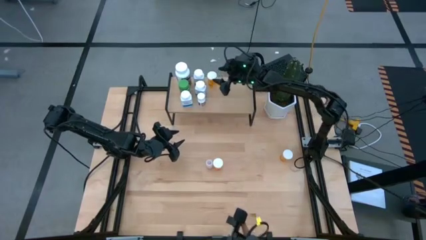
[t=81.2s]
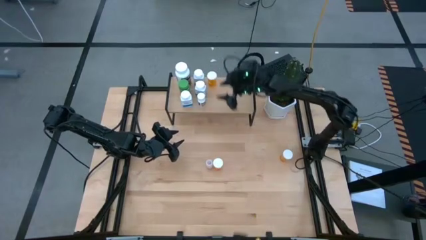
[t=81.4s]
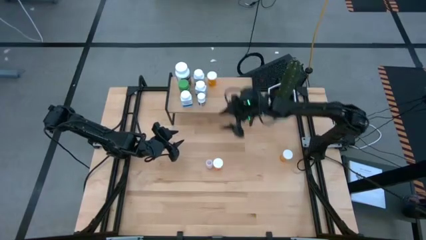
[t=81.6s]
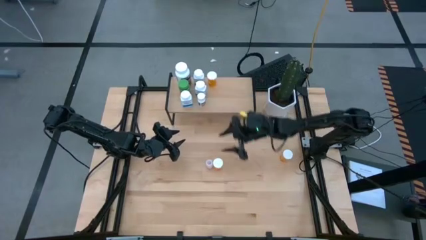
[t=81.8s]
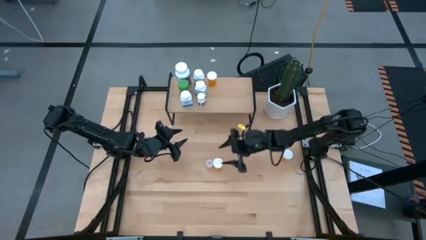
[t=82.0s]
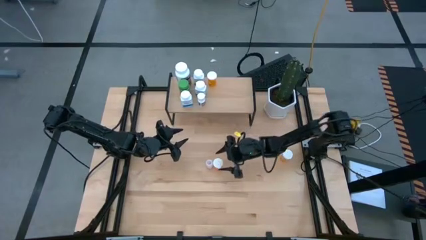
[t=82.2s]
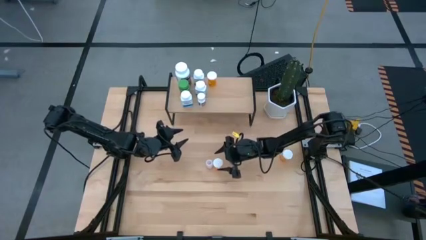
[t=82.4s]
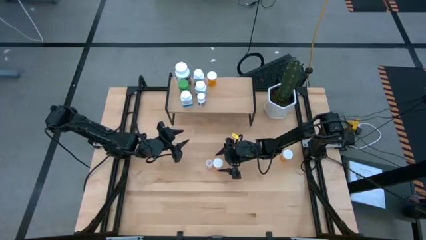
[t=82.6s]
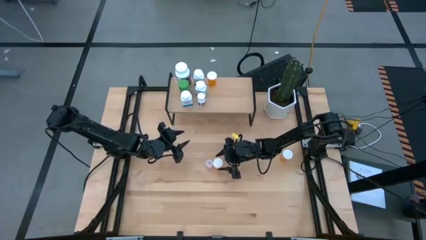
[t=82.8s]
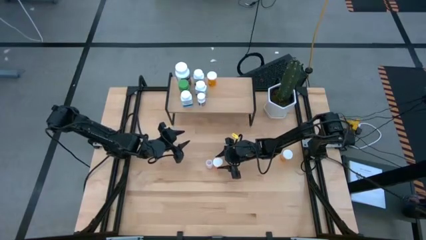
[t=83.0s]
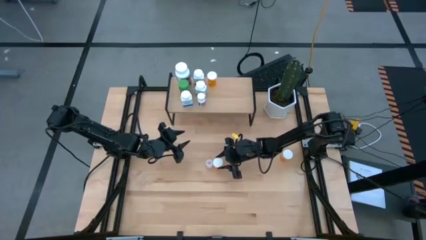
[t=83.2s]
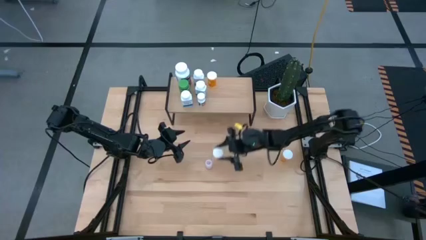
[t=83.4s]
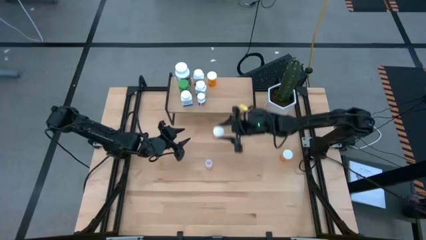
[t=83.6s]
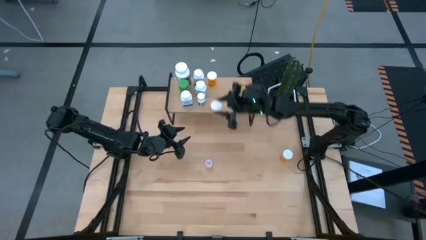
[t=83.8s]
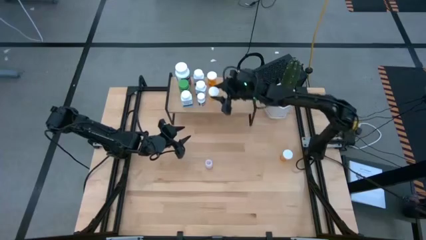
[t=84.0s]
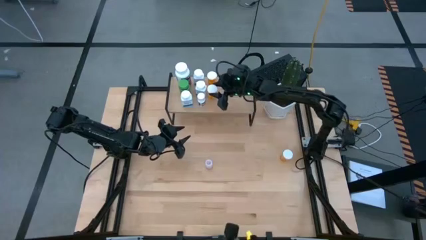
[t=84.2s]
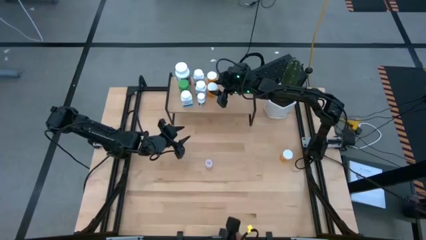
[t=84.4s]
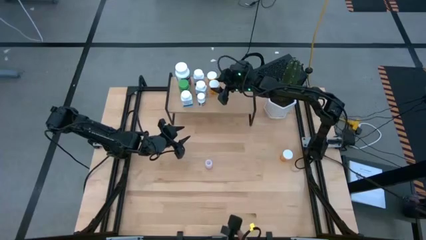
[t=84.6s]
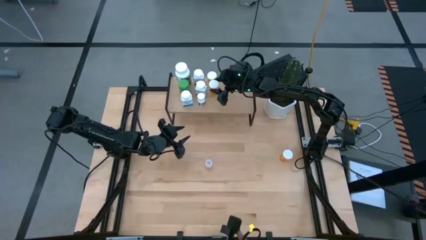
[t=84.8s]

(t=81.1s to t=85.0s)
Task: Pick and place medicine bottles onto shelf by color
Put the yellow pill bottle on the shelf aligned with the other yellow pill bottle

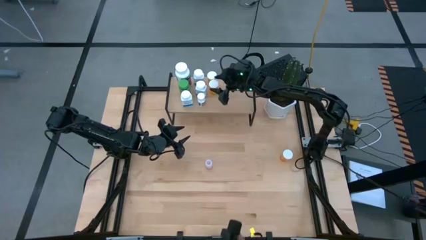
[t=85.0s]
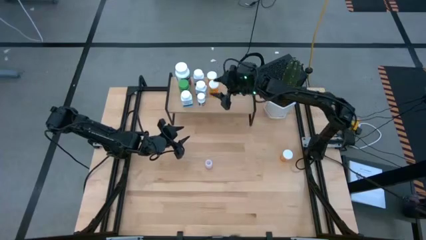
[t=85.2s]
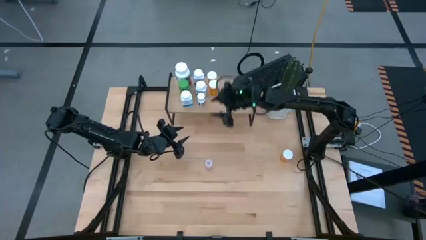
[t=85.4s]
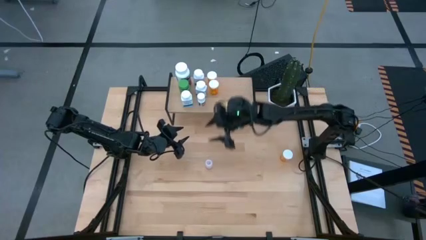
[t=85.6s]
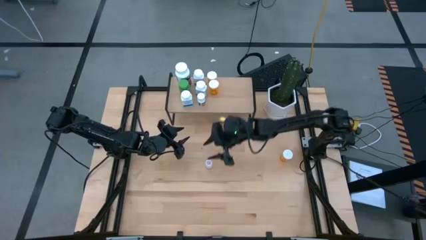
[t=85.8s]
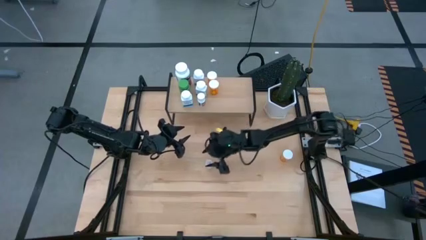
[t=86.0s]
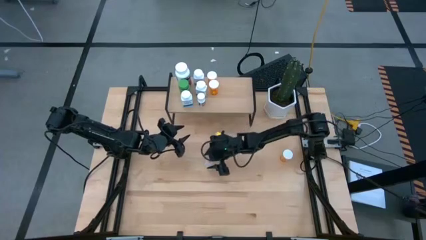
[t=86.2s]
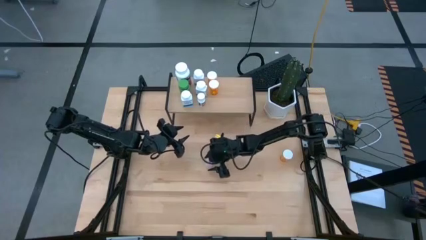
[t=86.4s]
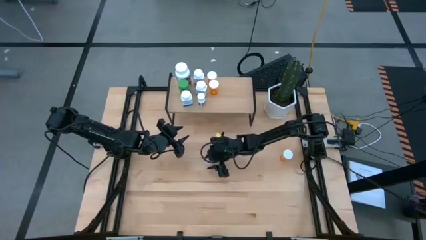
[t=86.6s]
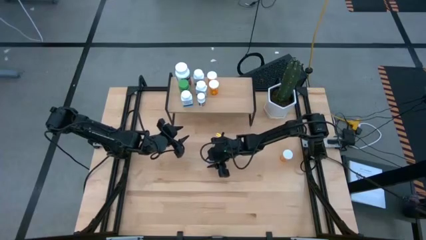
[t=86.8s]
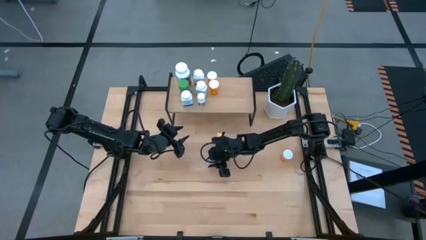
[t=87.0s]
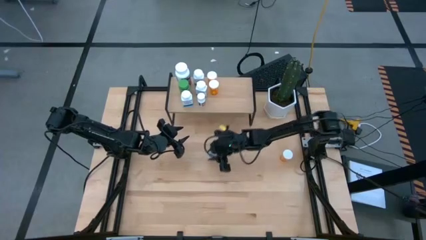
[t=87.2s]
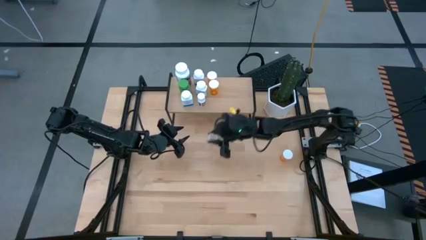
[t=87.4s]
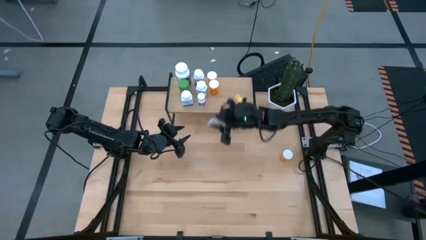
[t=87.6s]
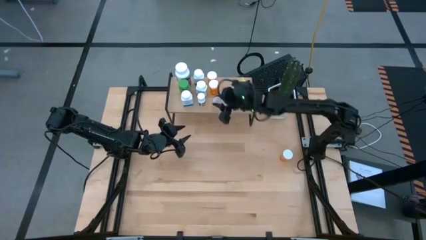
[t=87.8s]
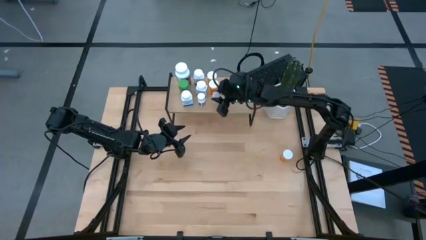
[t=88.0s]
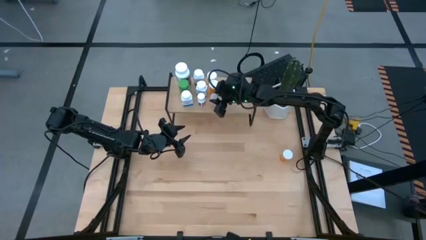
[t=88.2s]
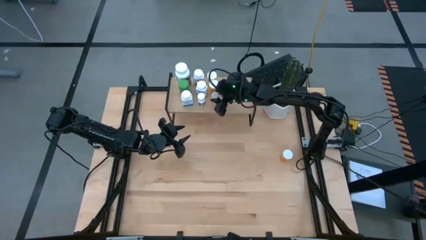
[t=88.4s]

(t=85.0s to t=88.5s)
Put the transparent pill bottle on the shelf

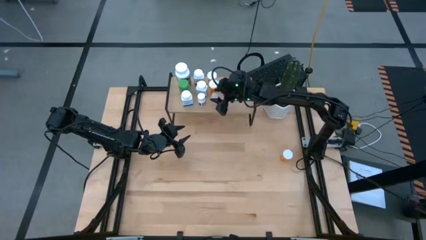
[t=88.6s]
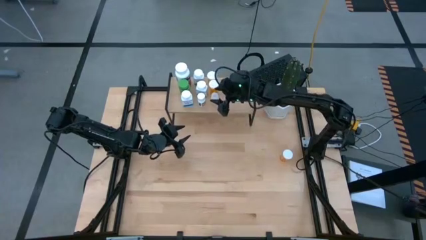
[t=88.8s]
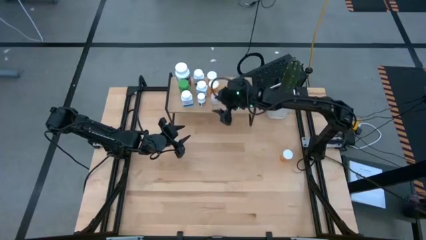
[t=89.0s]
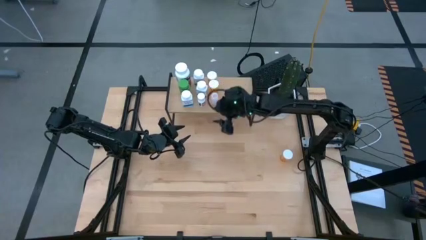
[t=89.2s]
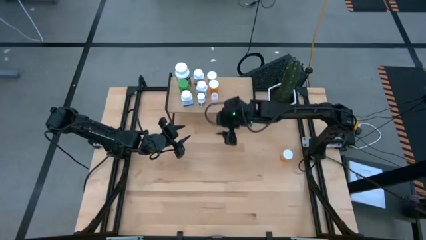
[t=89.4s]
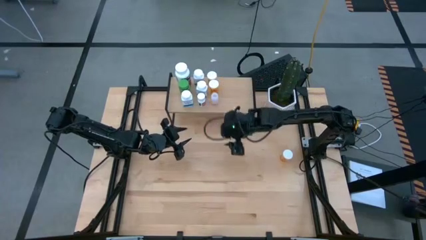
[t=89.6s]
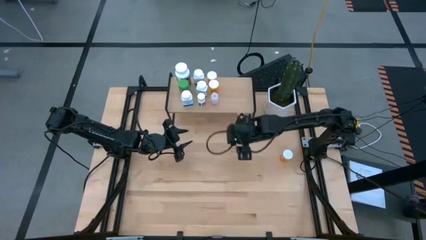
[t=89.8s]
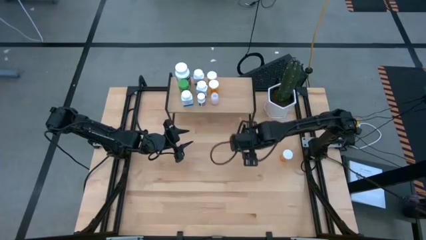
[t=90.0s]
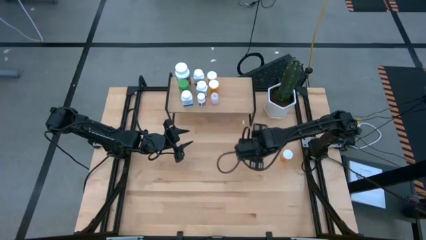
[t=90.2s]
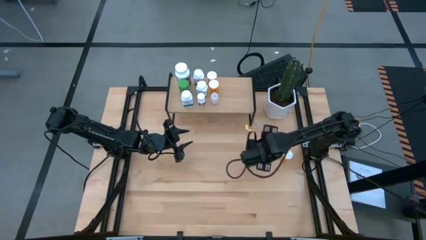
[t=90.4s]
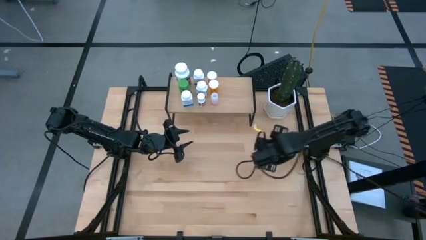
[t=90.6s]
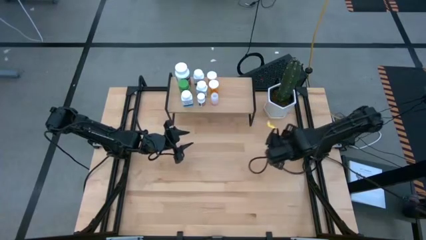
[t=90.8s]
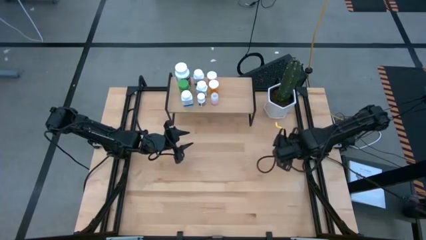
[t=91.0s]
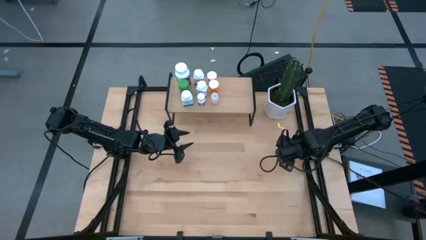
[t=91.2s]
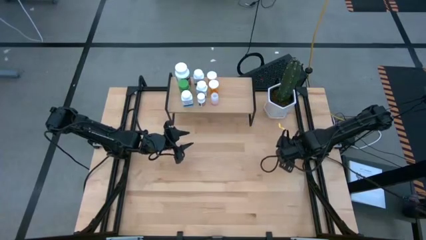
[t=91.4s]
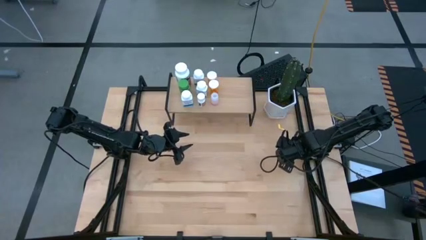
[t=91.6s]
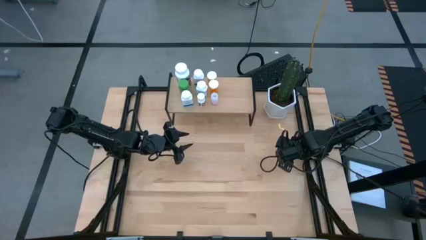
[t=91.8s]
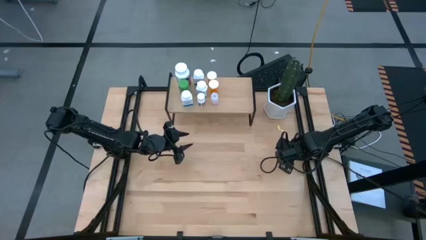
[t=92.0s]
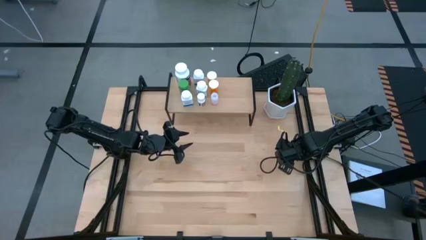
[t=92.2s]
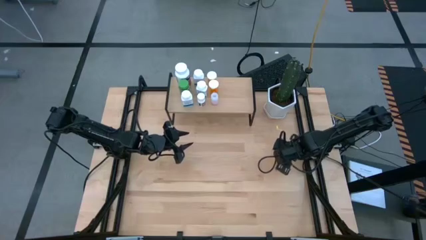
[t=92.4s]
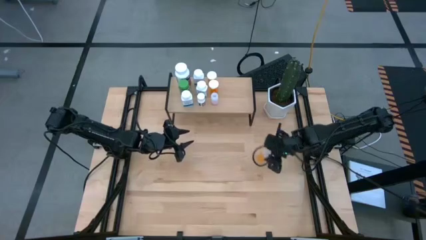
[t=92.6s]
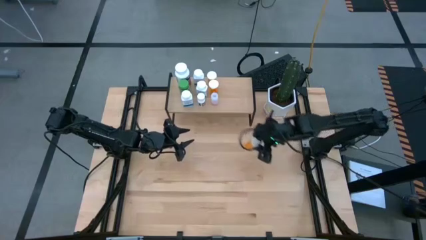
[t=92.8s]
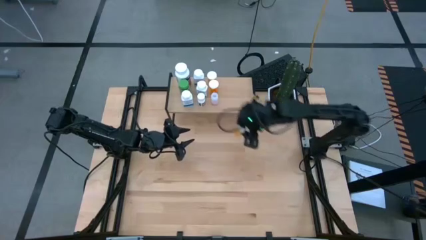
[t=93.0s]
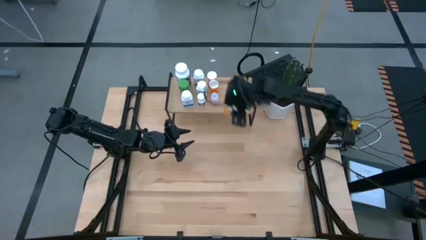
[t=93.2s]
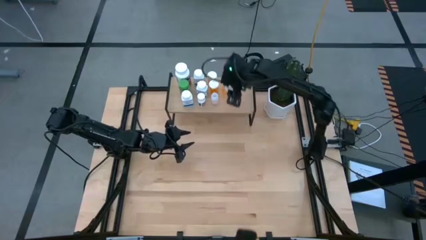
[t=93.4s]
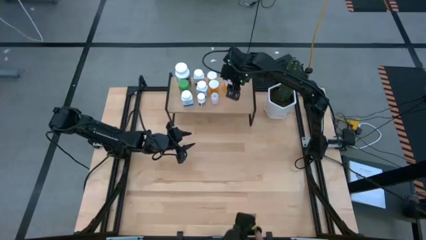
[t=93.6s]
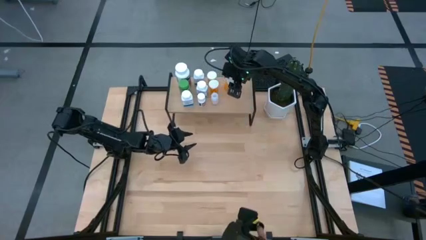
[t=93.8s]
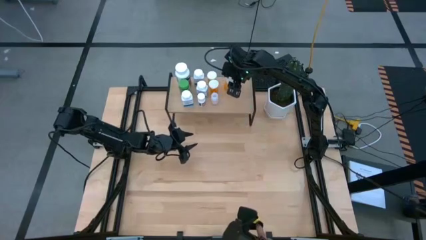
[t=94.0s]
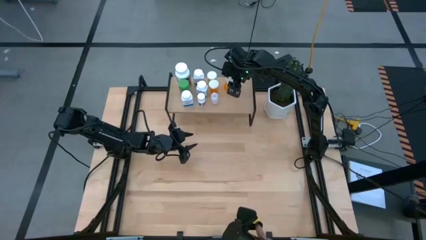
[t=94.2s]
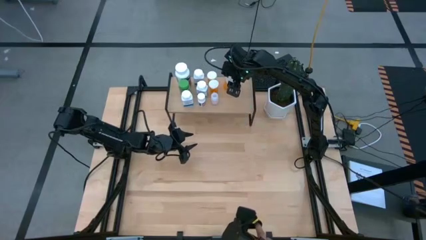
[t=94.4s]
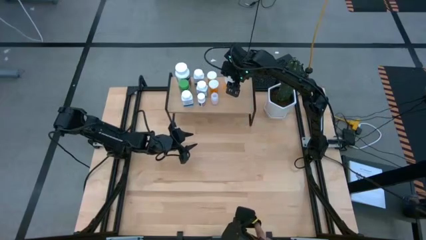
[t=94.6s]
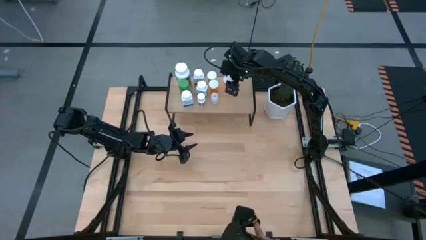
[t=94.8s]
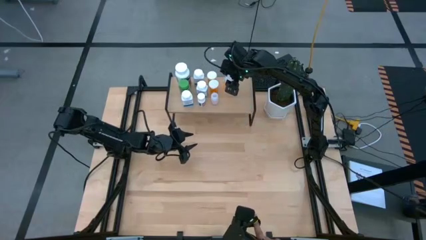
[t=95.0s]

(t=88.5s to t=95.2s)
Put the yellow pill bottle on the shelf
